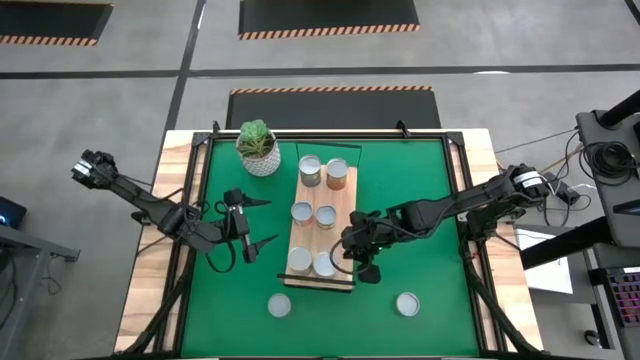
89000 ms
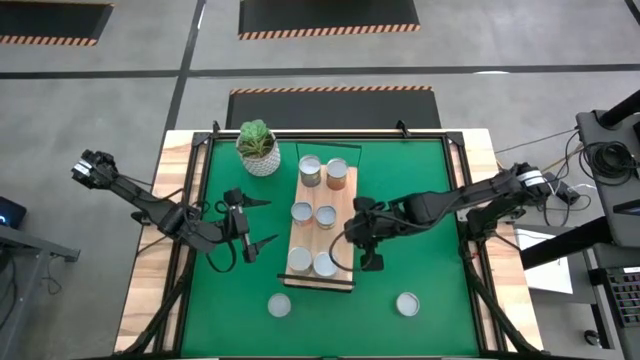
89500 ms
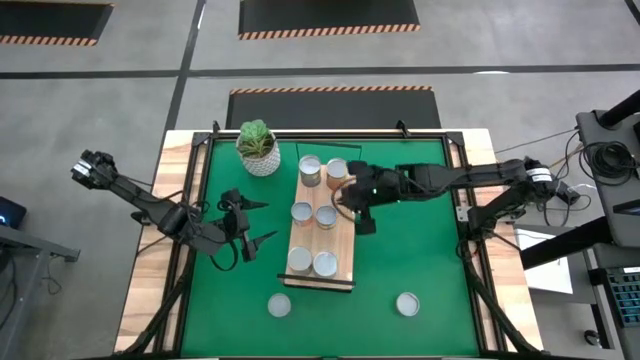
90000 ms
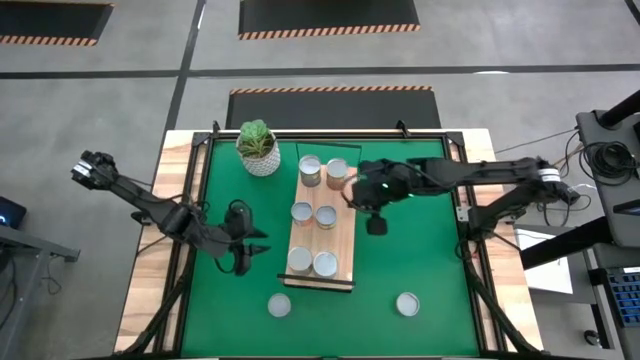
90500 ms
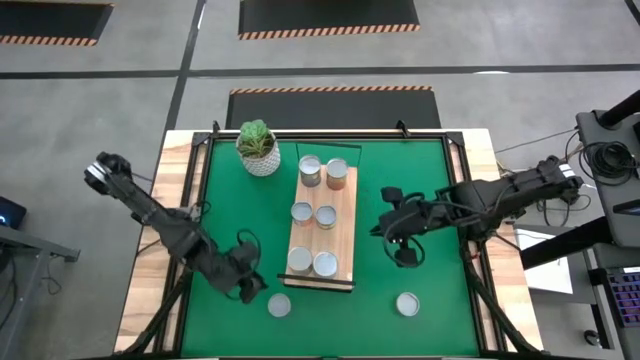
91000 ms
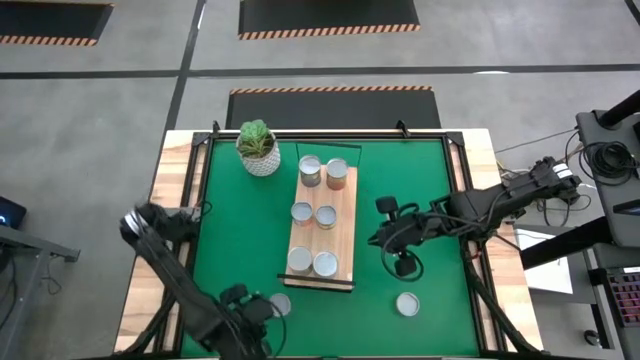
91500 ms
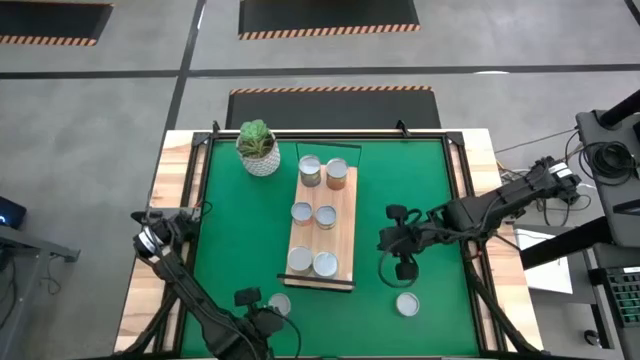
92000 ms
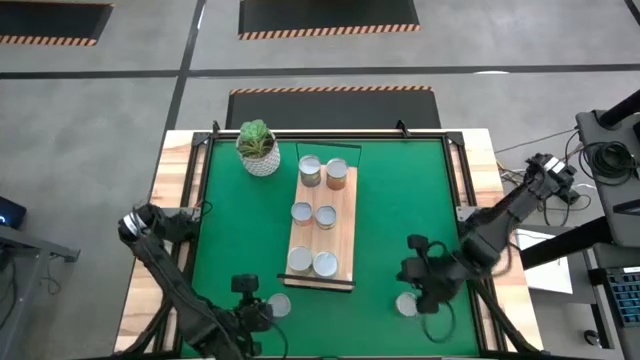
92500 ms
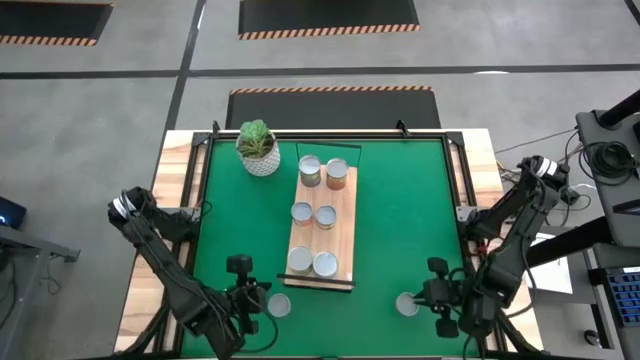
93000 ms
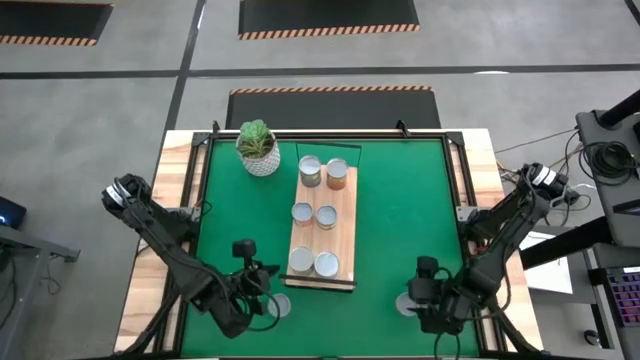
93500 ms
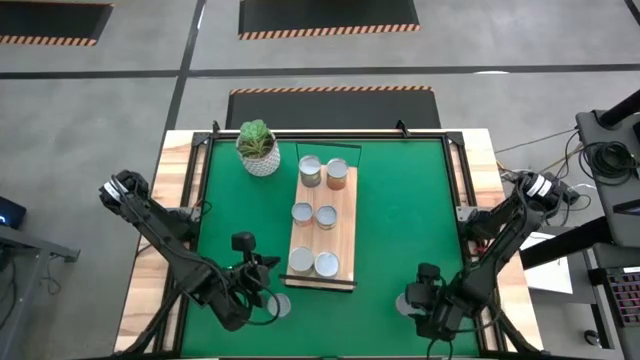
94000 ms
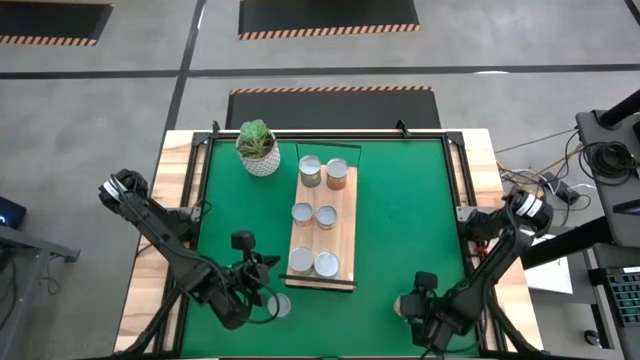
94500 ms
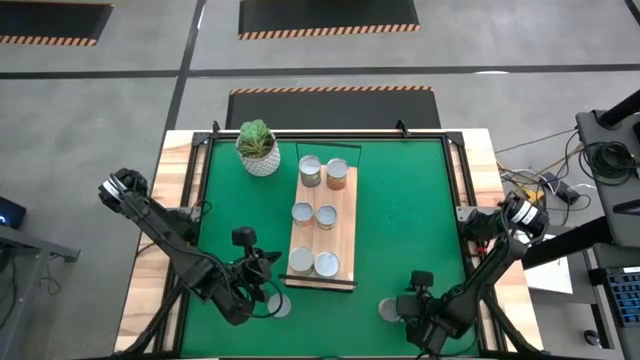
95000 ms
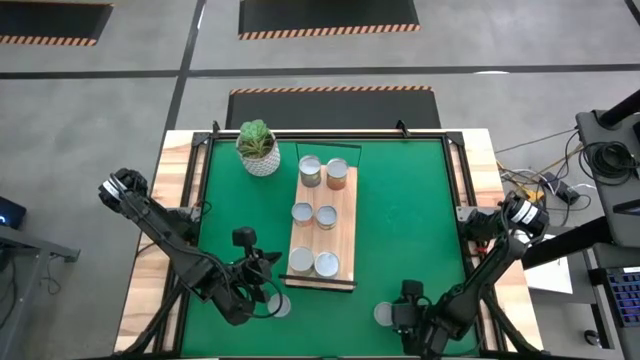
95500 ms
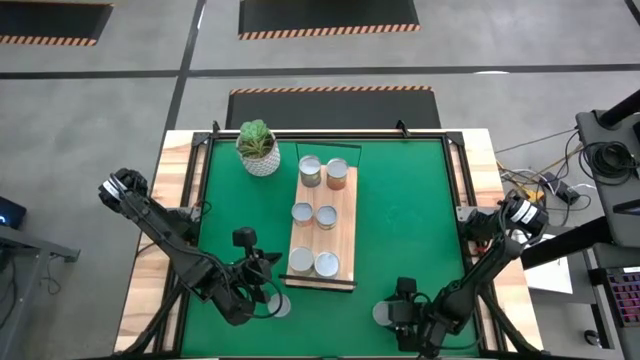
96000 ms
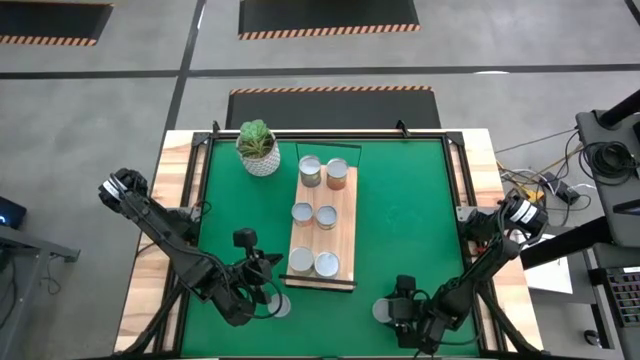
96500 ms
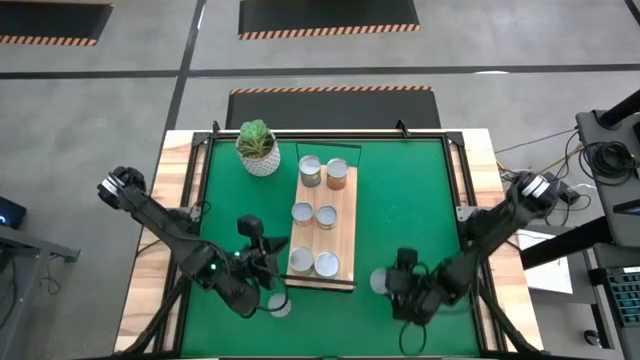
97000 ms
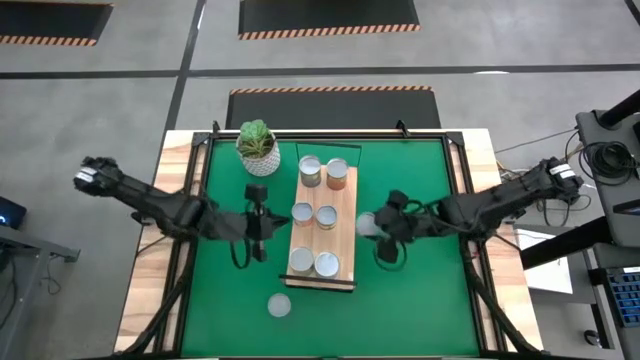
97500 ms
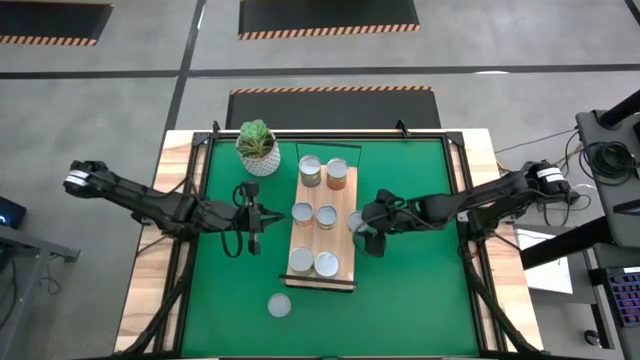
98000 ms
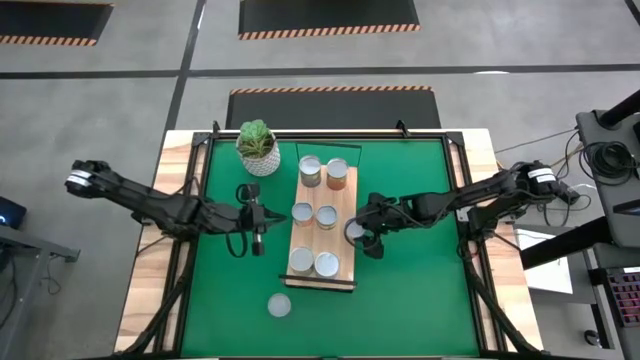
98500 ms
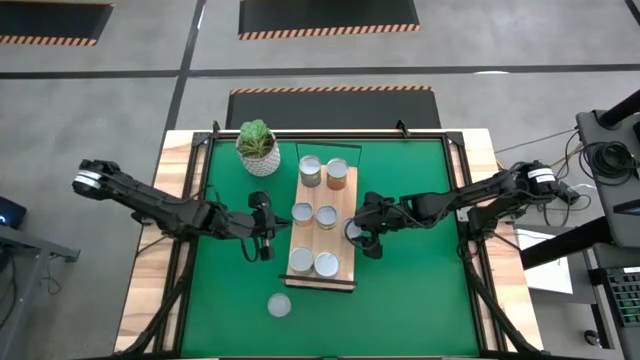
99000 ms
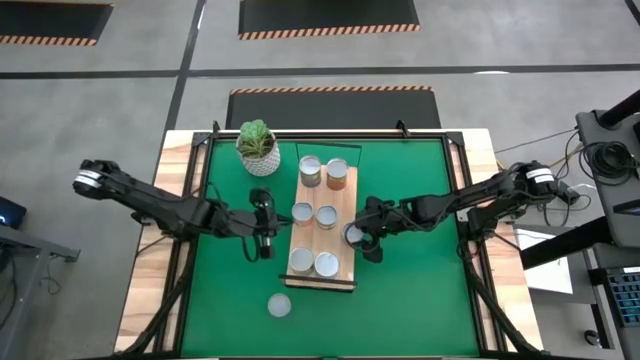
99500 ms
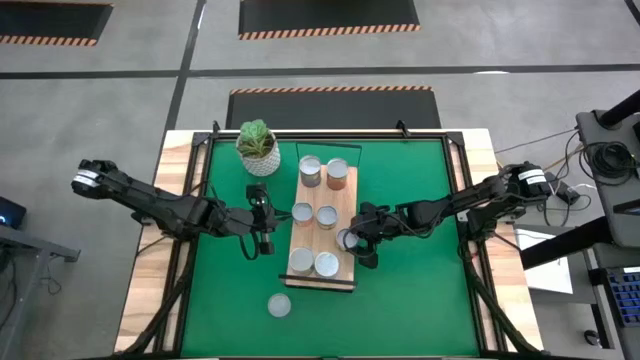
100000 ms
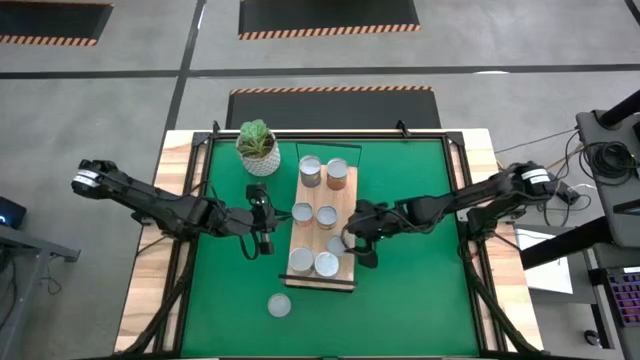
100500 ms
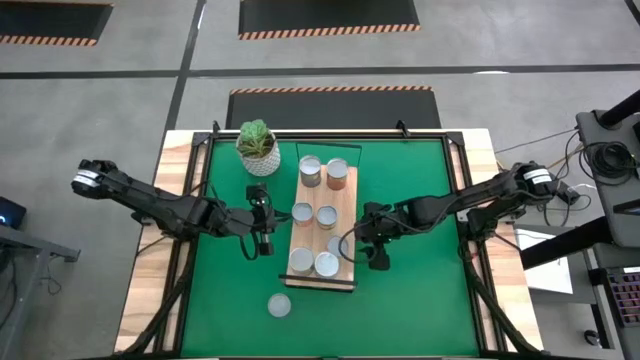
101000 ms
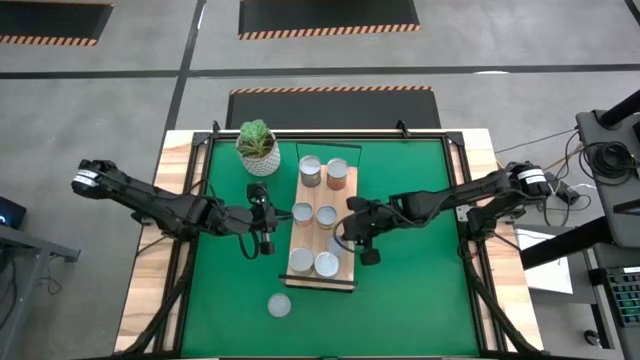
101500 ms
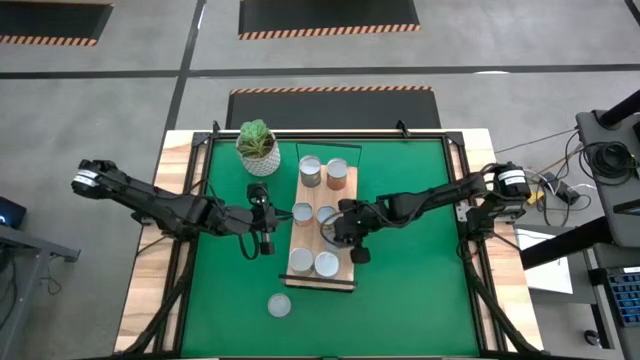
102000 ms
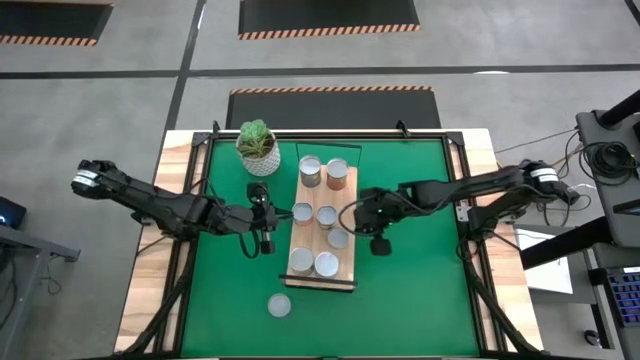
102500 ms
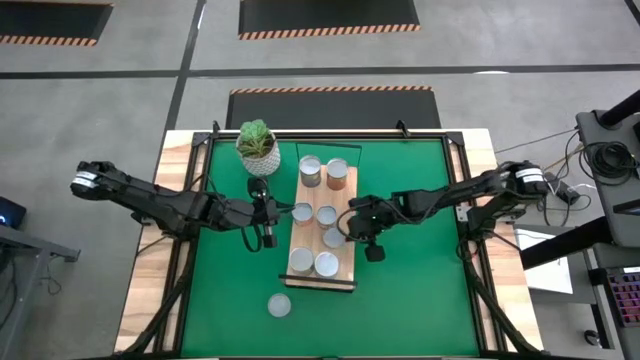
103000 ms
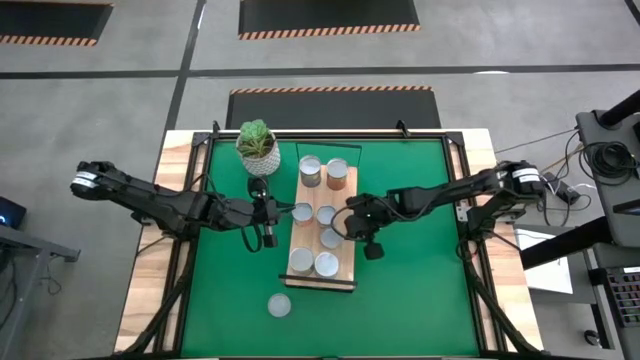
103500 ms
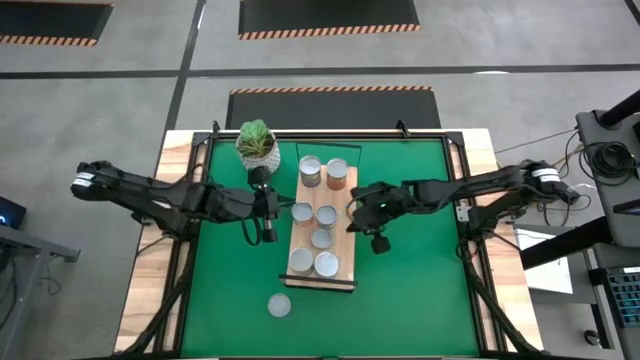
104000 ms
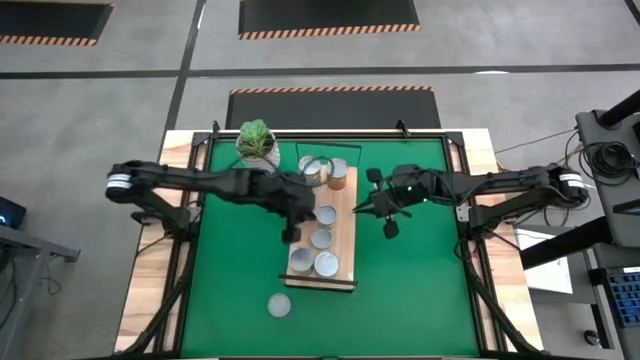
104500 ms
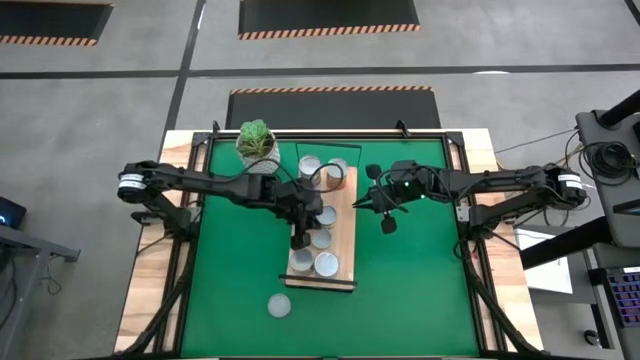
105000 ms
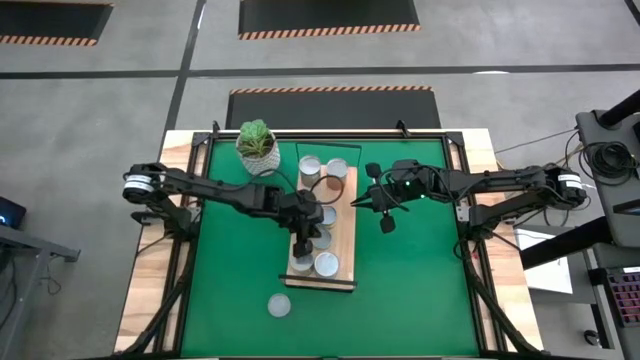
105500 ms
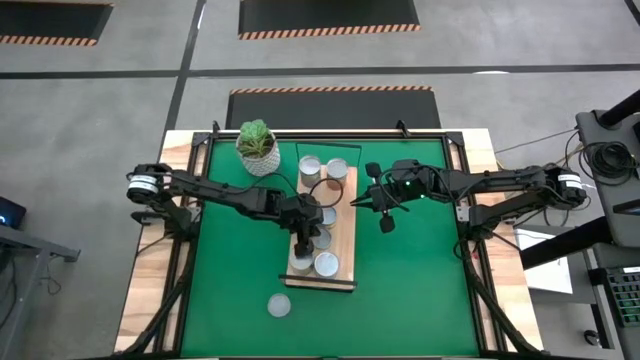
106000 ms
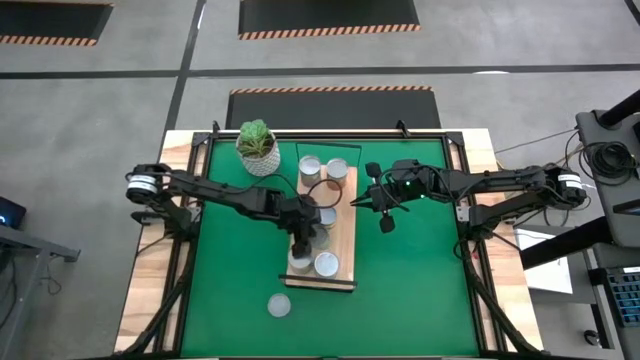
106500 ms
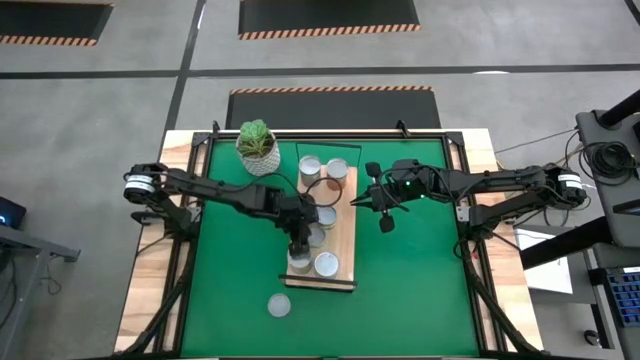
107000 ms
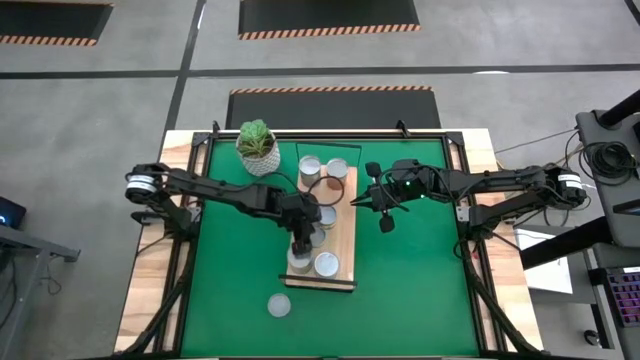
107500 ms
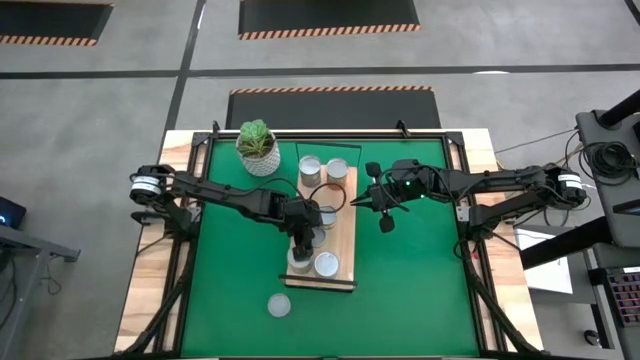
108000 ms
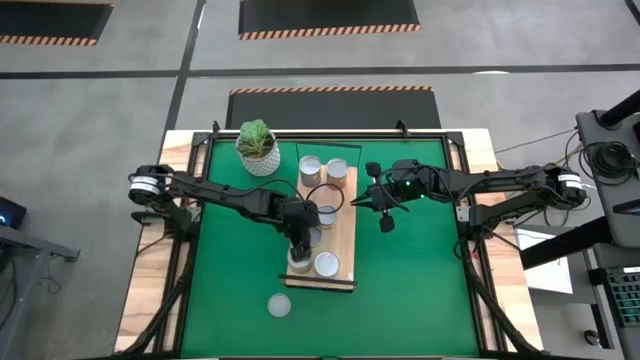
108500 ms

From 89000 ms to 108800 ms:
Task: Pick and place cans onto a shelf
Put the canned mushroom on the shelf

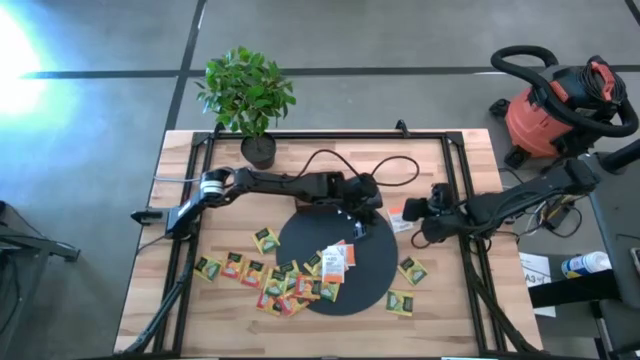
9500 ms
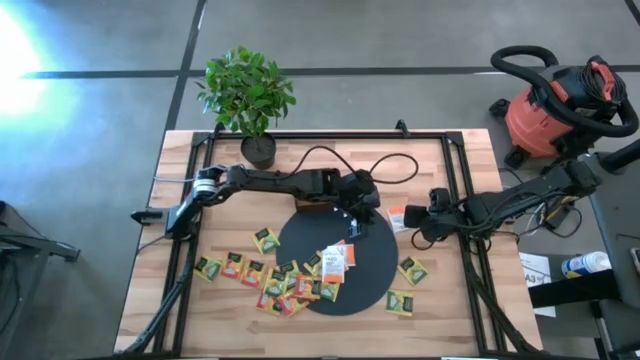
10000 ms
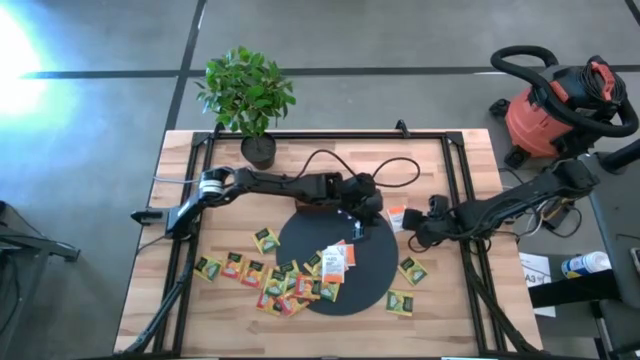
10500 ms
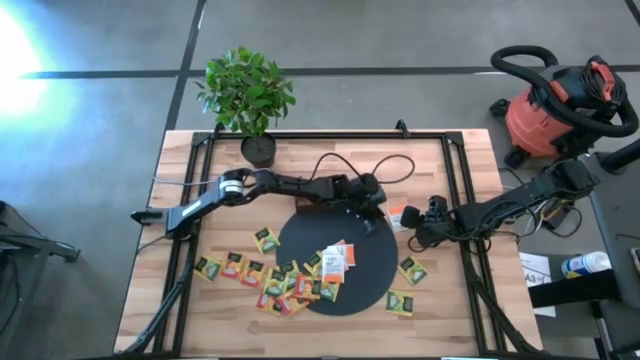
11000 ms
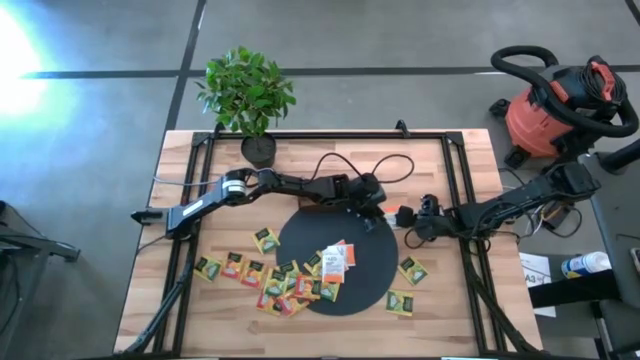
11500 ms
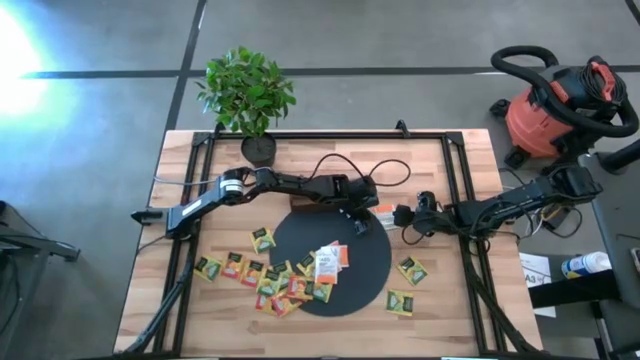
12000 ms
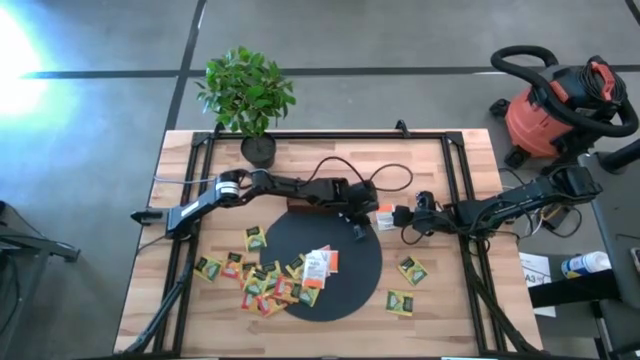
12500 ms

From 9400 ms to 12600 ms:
Task: Pick & Place Tea
Adjust the mat on the table
